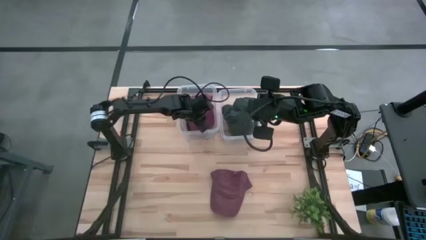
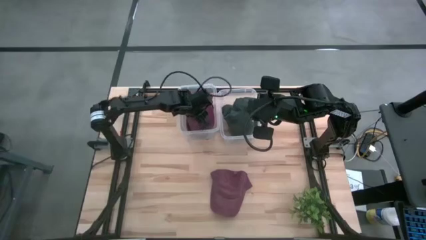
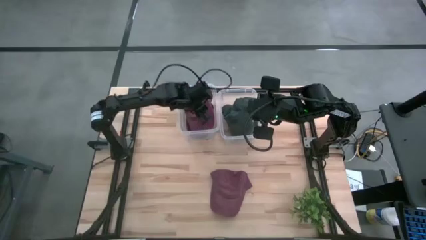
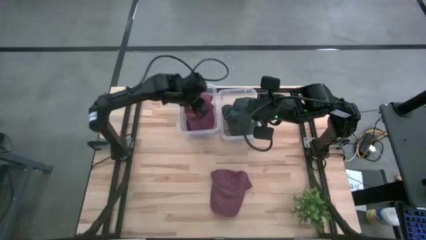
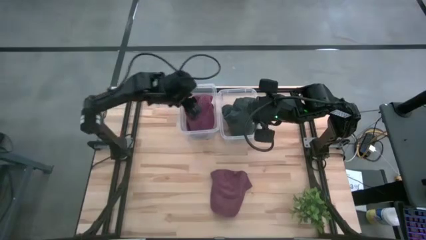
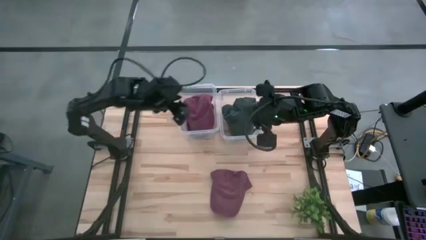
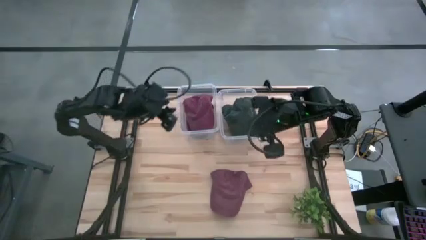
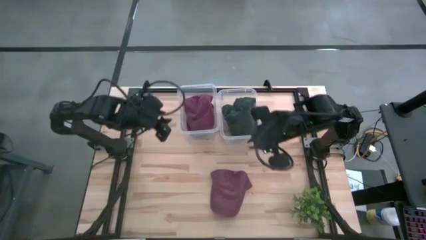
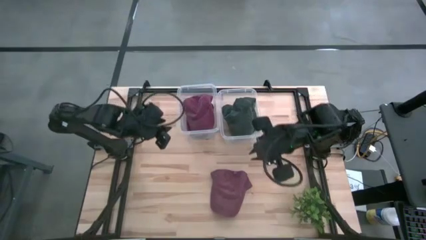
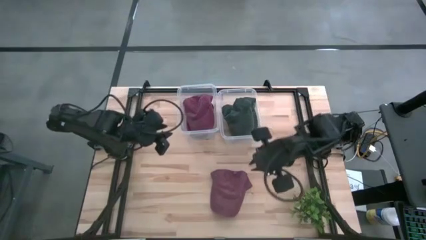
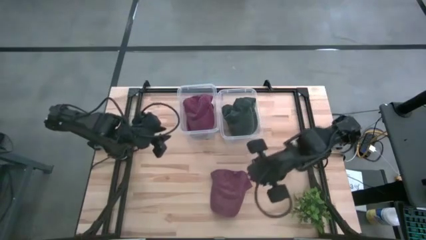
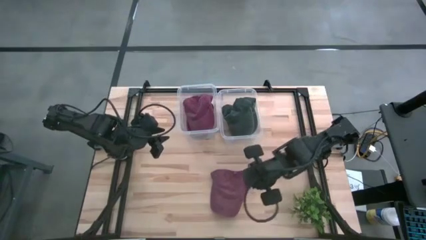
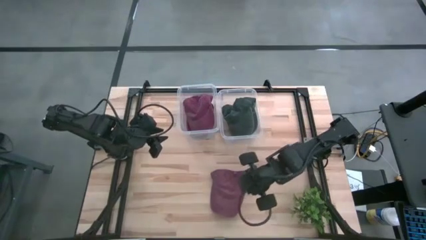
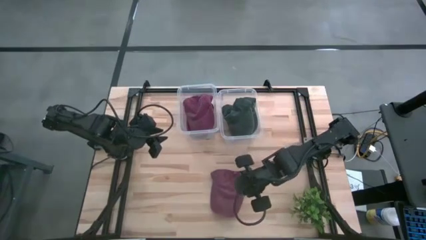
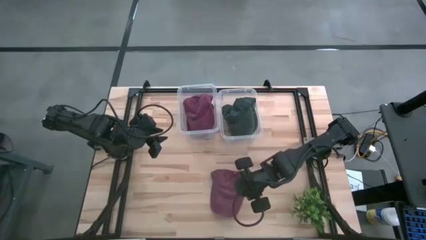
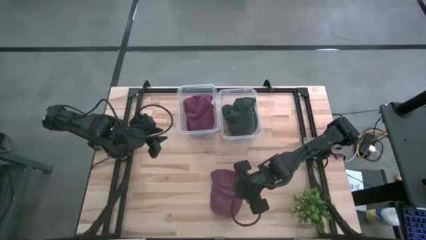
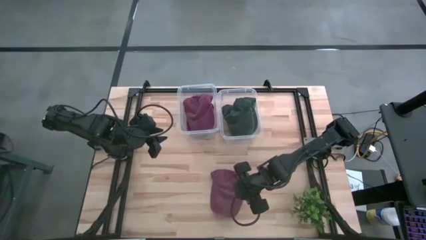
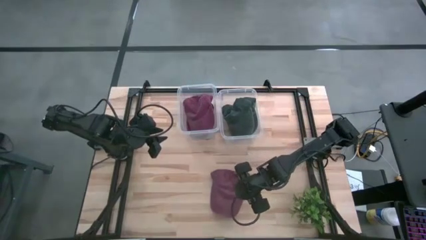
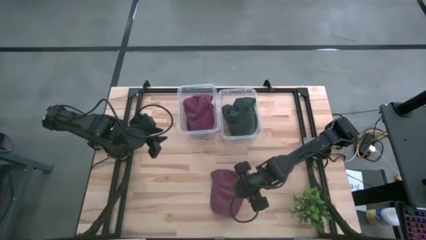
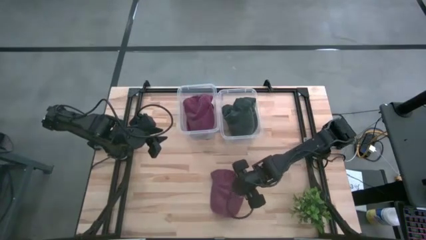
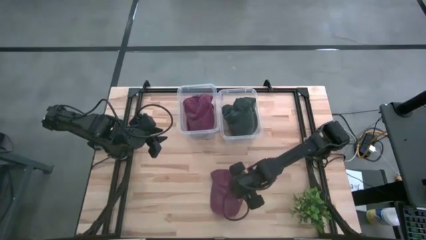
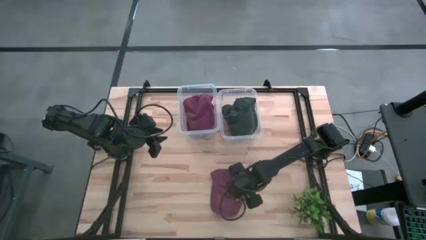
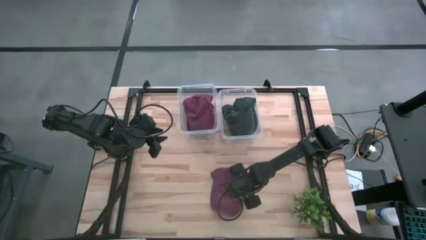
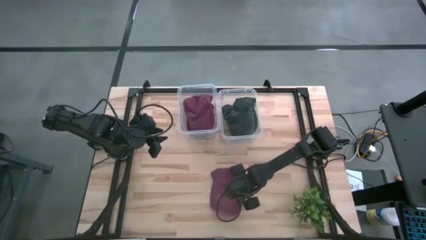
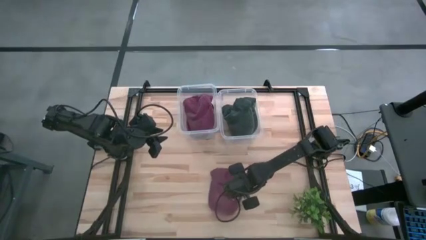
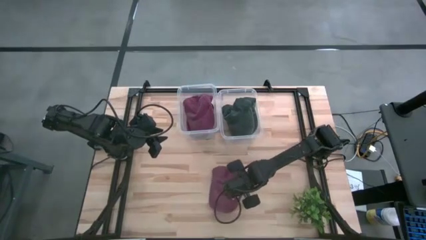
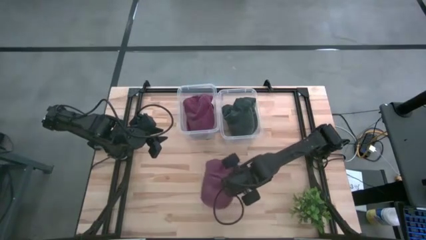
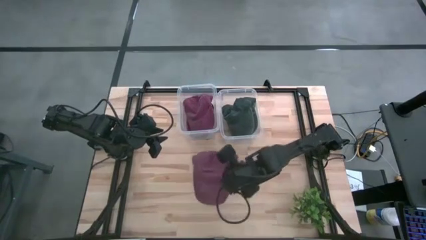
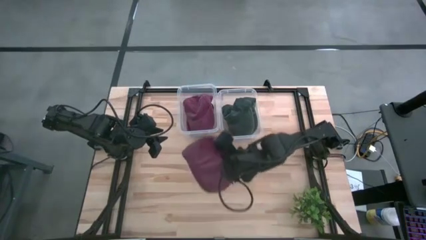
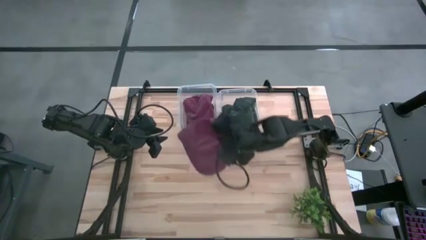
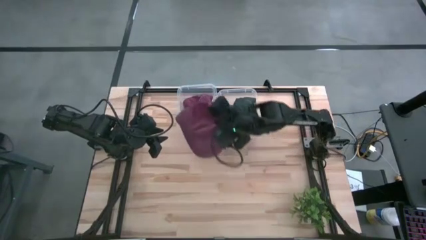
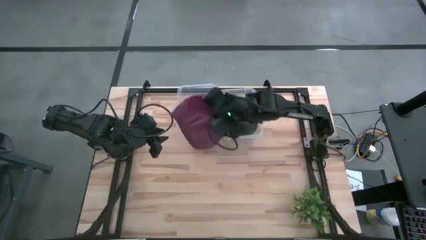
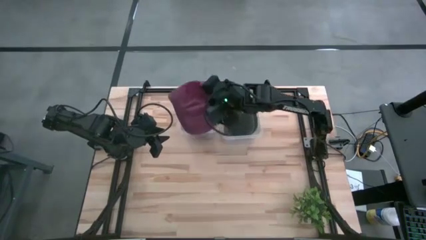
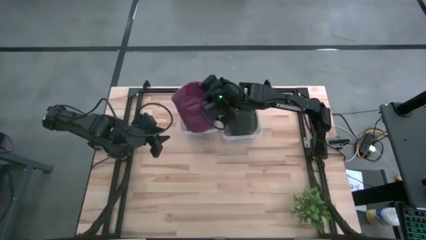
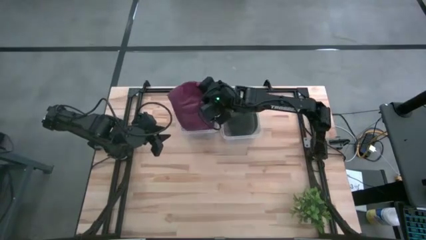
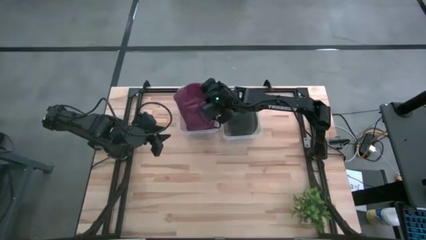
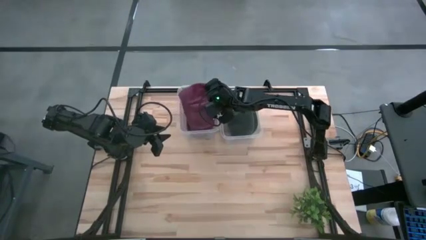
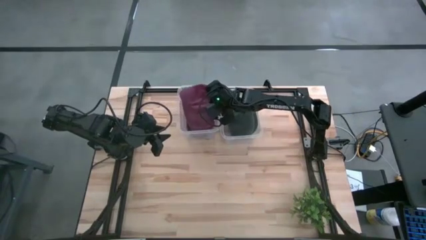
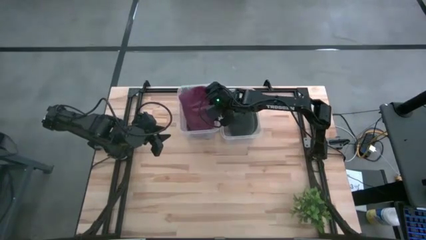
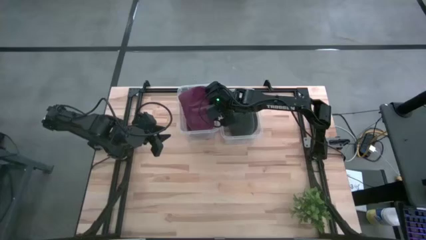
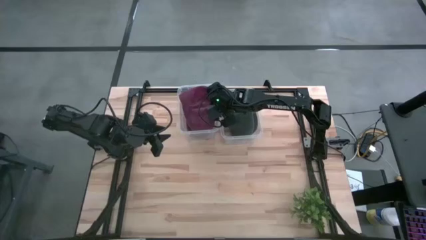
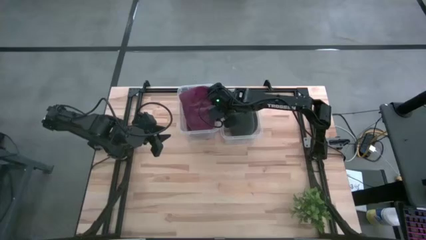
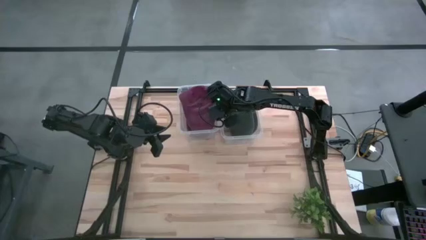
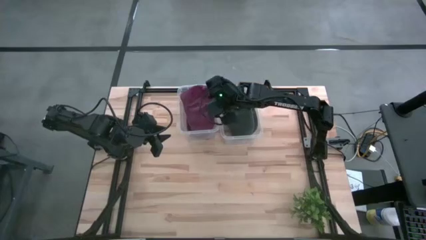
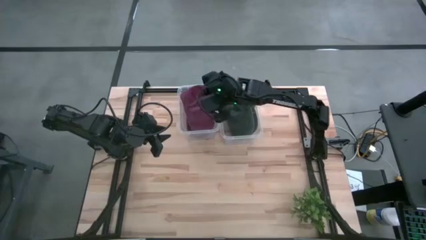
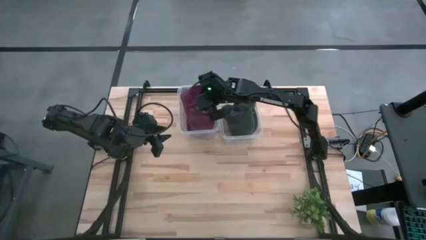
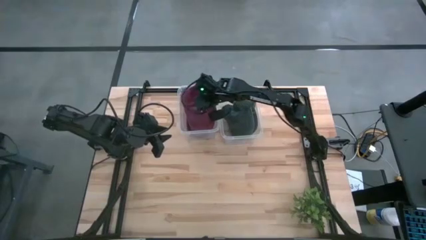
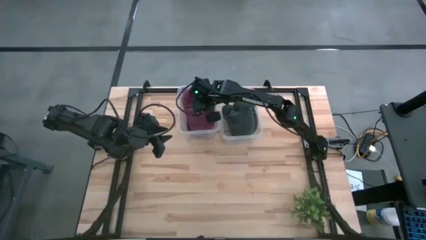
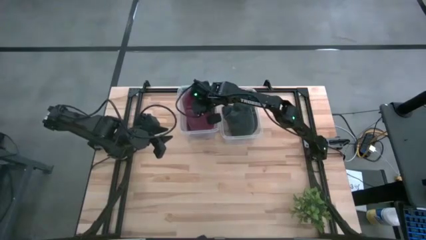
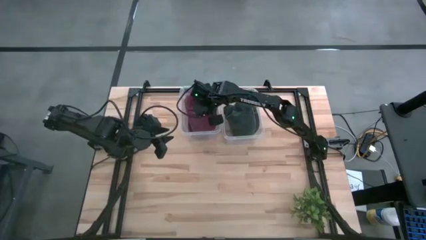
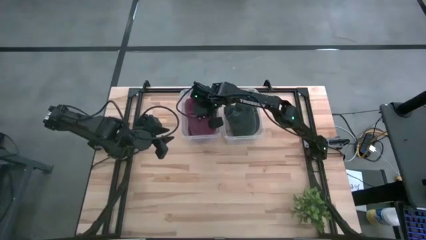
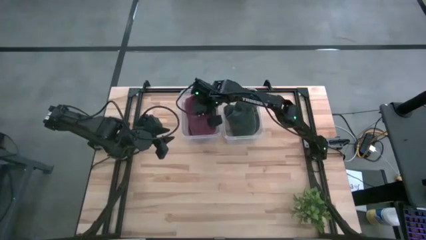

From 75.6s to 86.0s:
Task: Pick & Place hat
Put the red cap into the left transparent bin

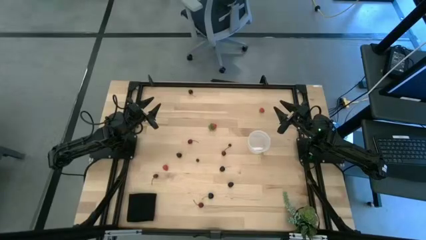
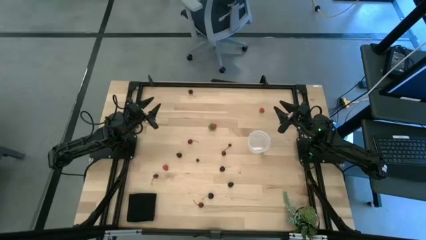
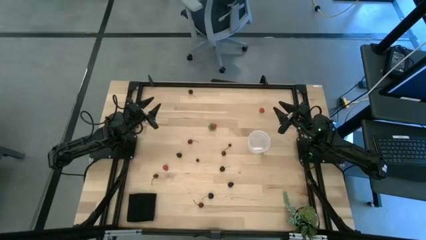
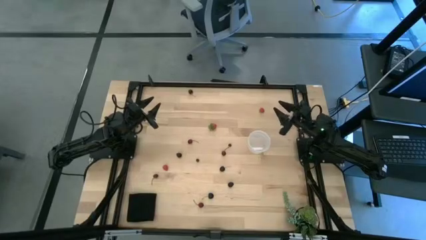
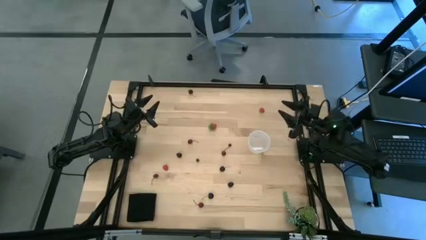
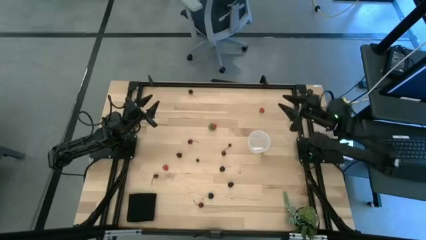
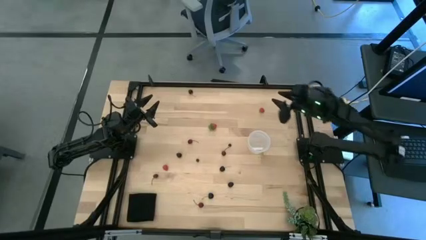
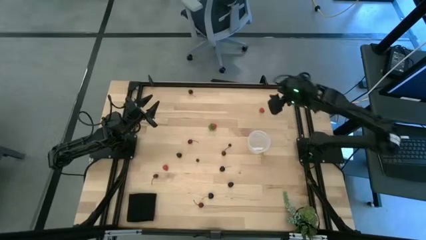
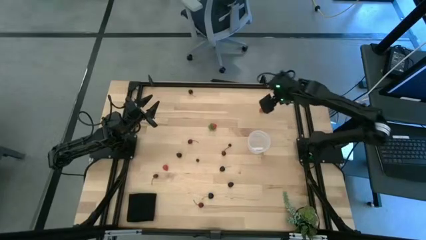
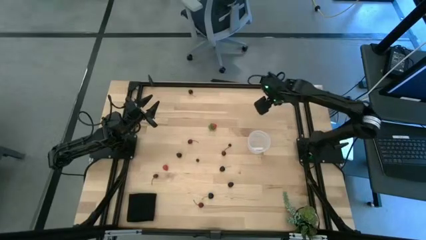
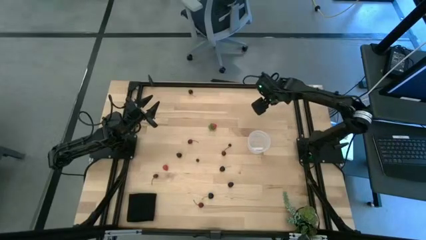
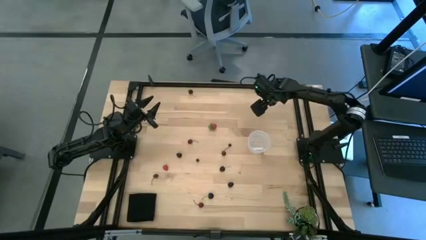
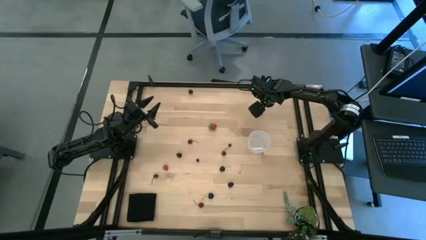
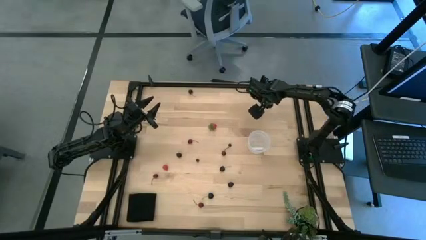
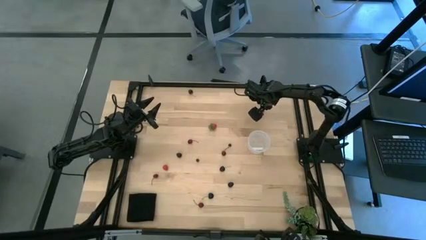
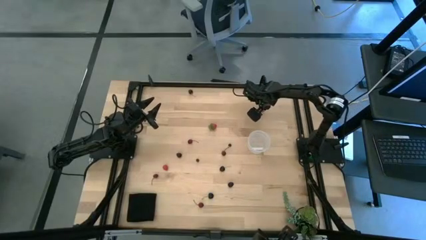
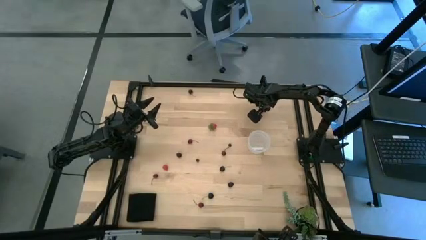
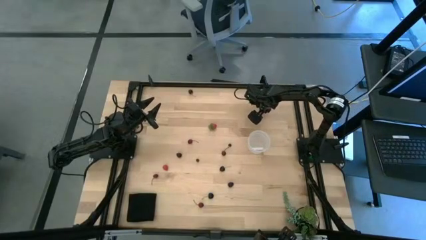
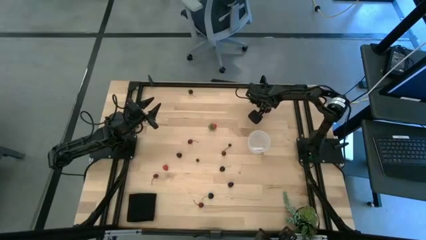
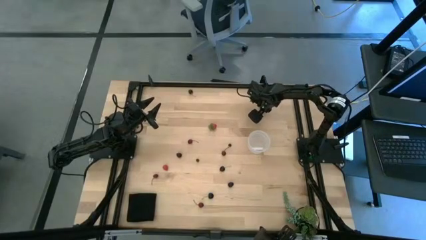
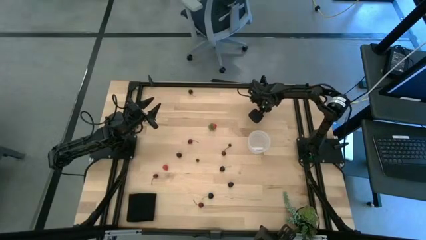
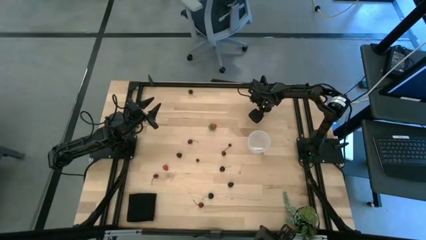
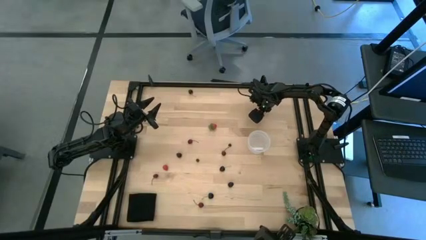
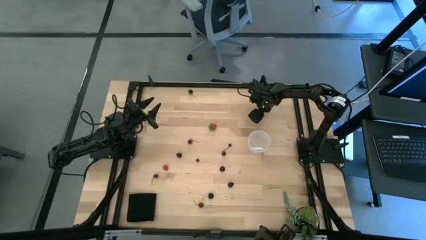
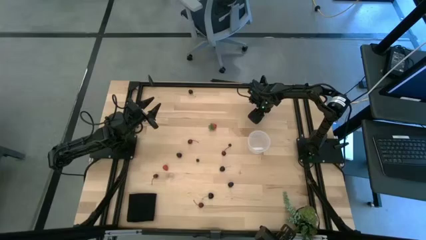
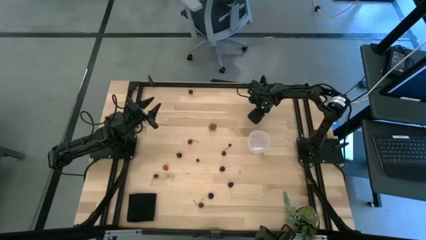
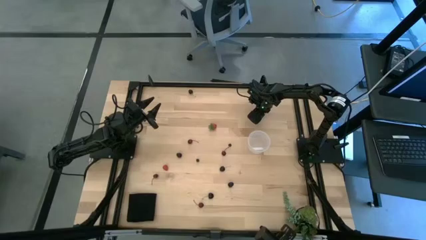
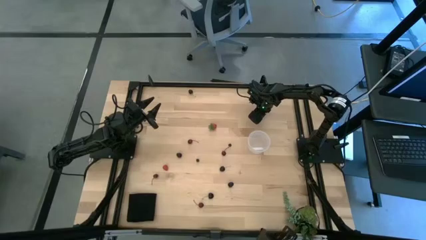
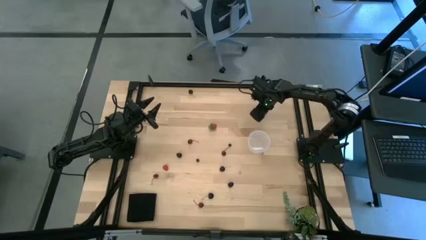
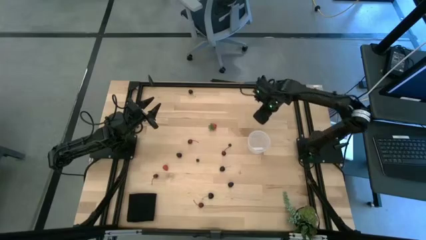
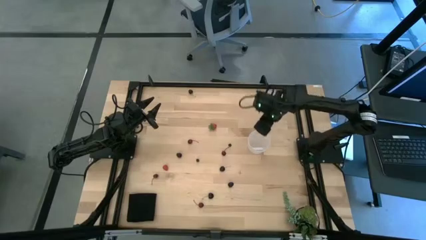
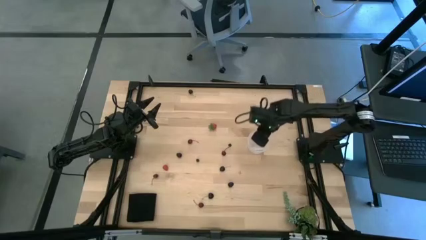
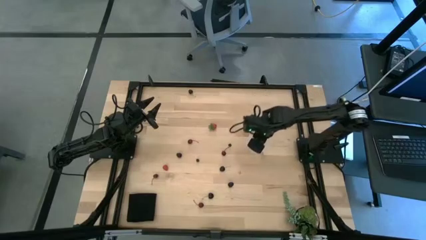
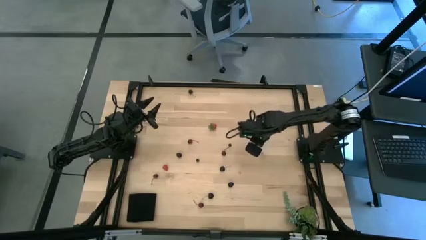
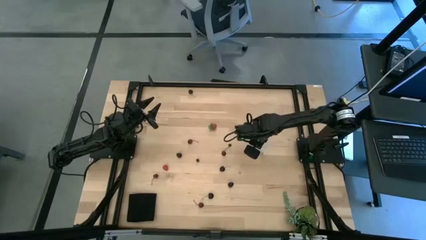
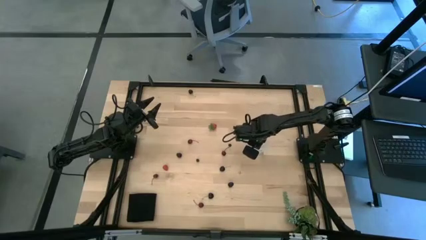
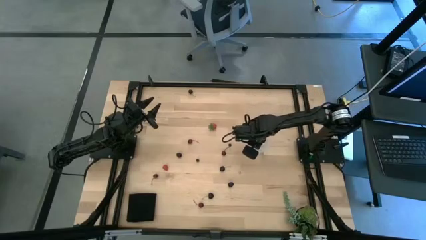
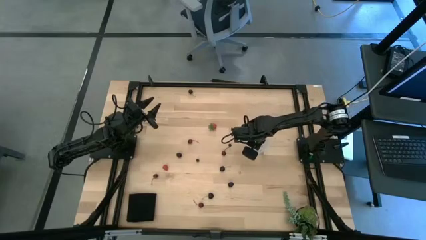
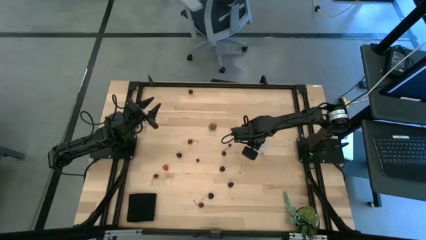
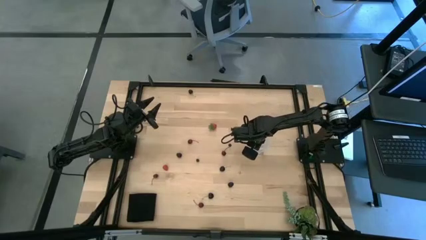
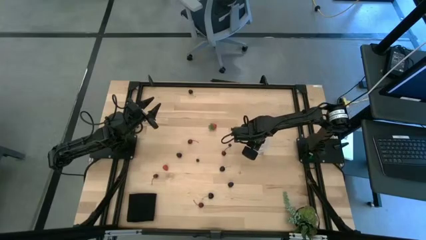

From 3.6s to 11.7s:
Task: Pick and placing Produce into tupperware
Put the red raspberry into the transparent bucket
